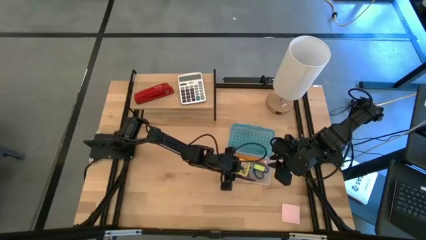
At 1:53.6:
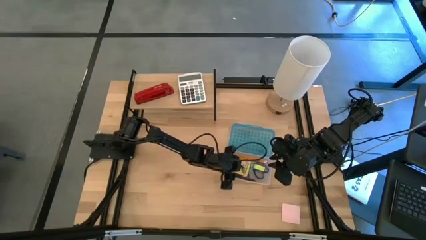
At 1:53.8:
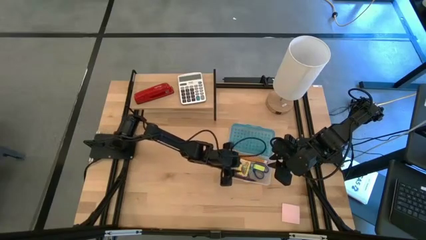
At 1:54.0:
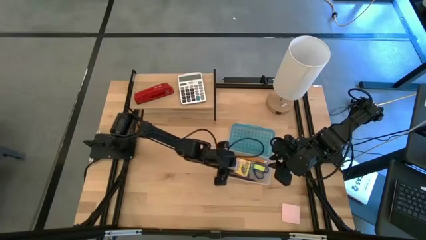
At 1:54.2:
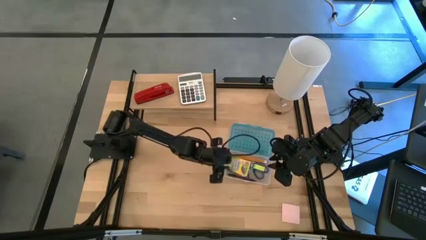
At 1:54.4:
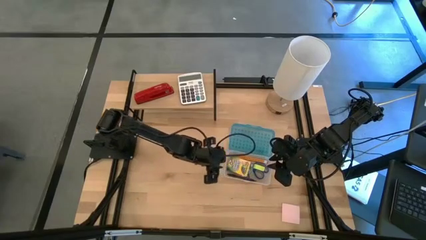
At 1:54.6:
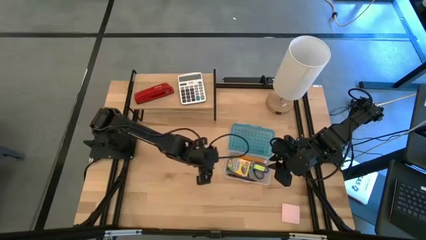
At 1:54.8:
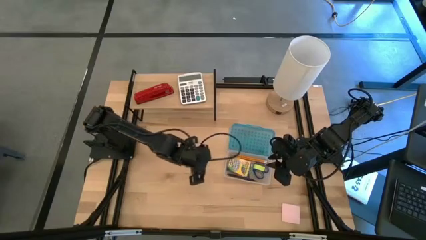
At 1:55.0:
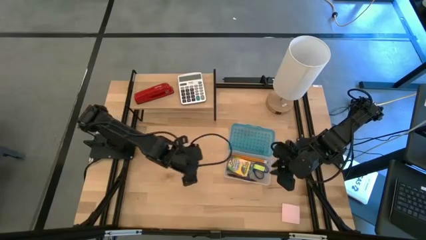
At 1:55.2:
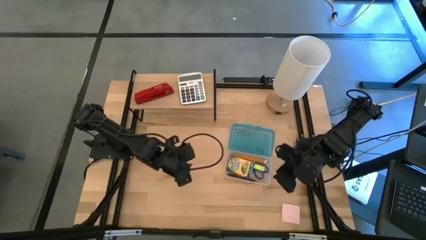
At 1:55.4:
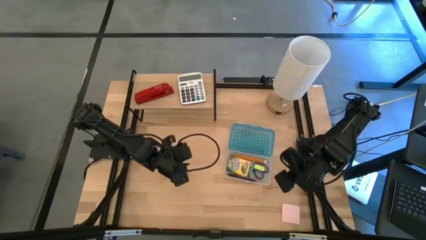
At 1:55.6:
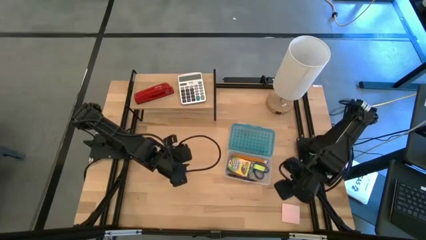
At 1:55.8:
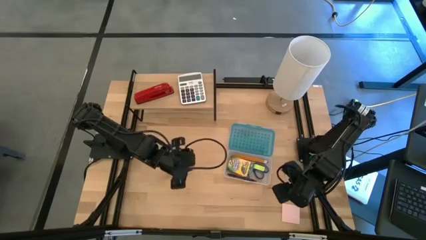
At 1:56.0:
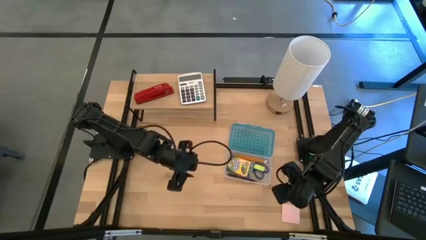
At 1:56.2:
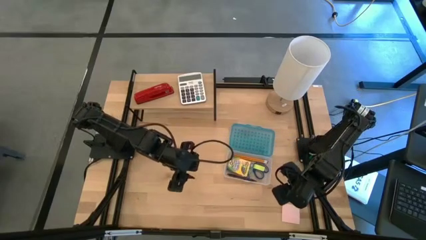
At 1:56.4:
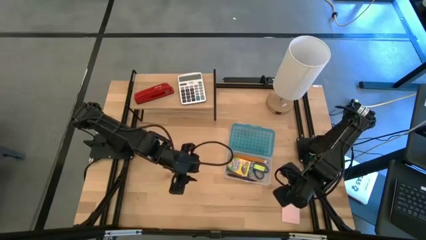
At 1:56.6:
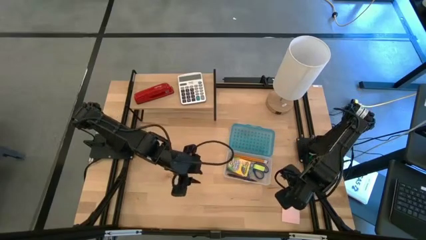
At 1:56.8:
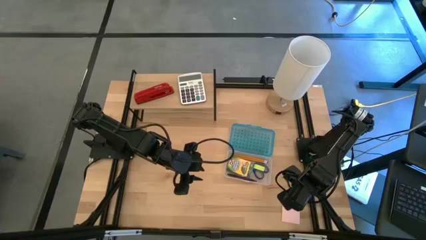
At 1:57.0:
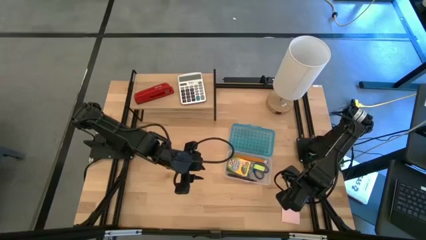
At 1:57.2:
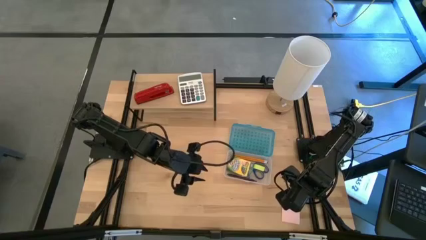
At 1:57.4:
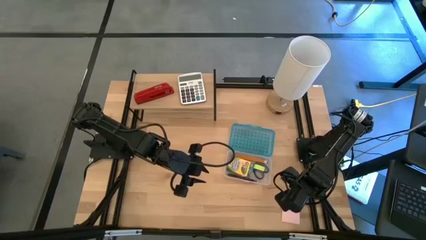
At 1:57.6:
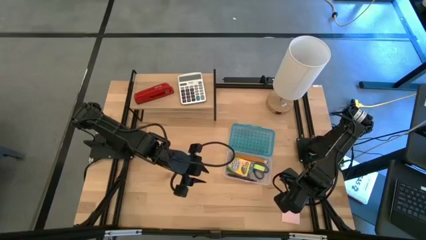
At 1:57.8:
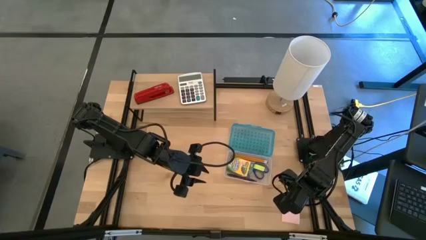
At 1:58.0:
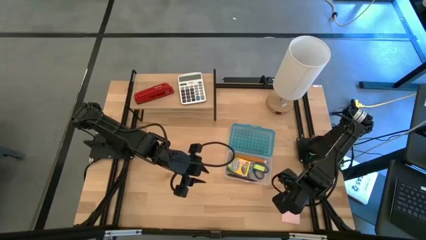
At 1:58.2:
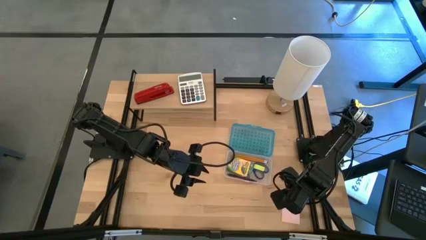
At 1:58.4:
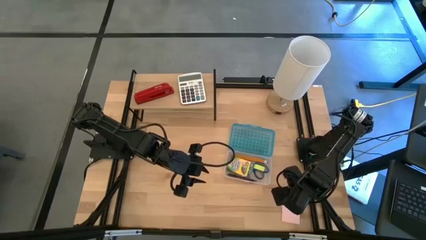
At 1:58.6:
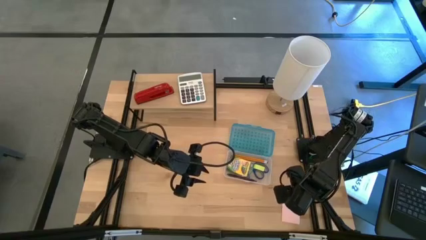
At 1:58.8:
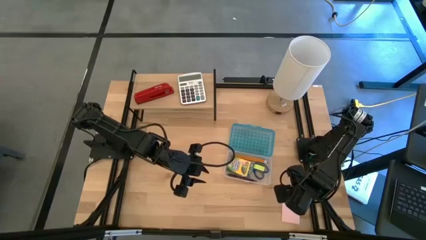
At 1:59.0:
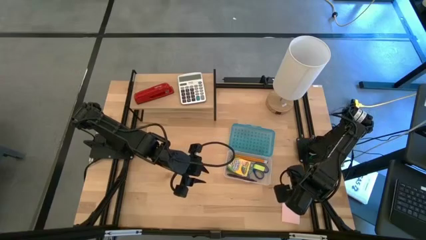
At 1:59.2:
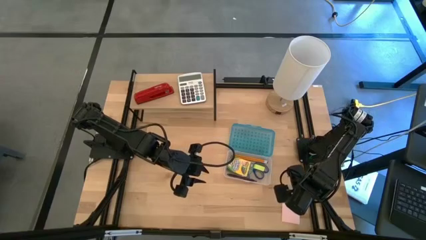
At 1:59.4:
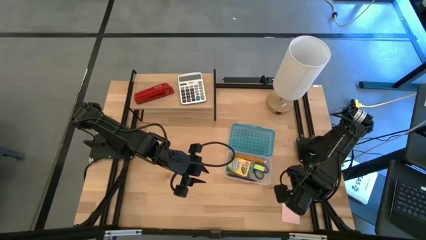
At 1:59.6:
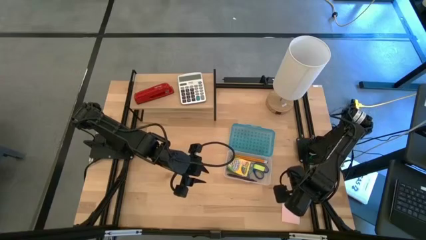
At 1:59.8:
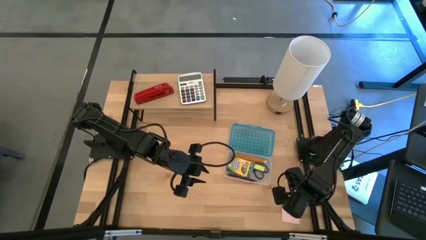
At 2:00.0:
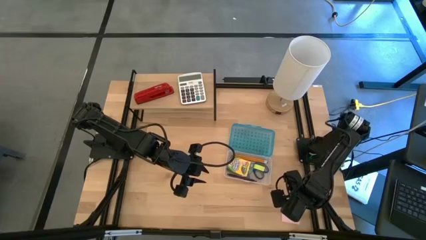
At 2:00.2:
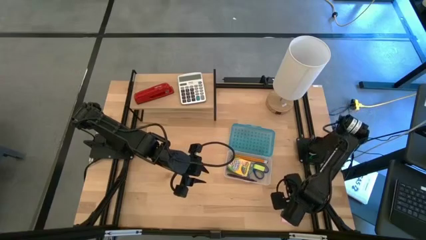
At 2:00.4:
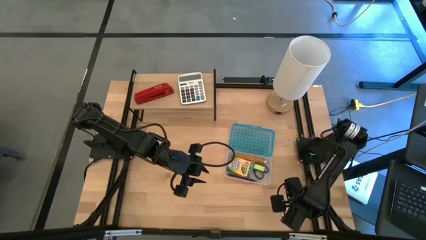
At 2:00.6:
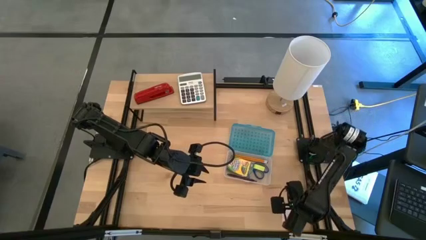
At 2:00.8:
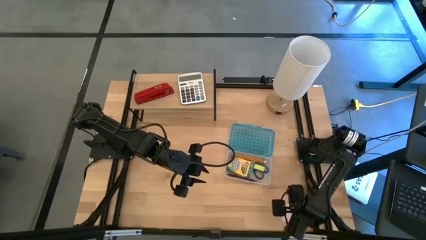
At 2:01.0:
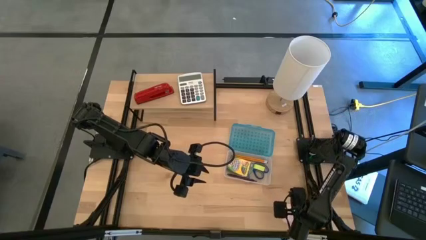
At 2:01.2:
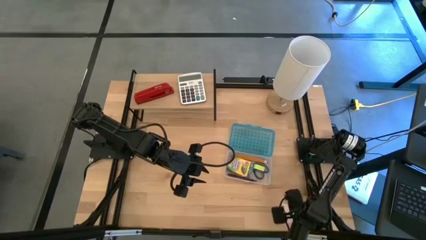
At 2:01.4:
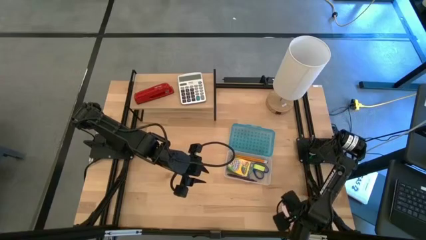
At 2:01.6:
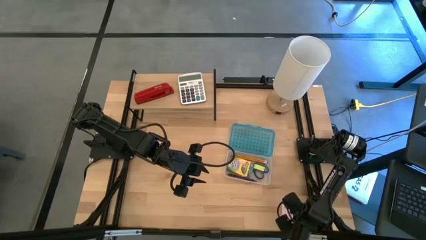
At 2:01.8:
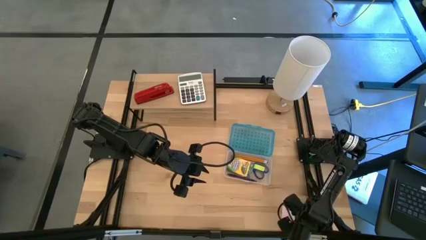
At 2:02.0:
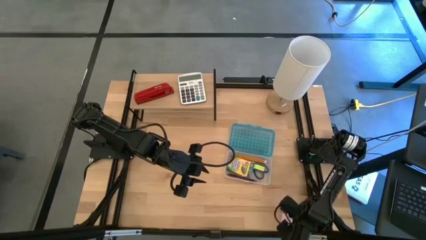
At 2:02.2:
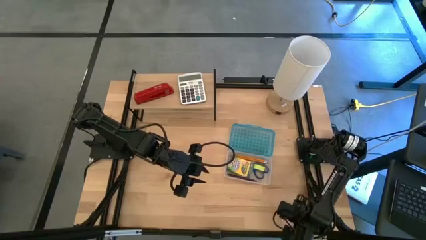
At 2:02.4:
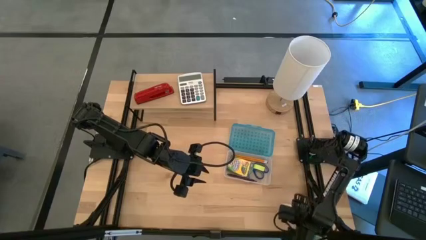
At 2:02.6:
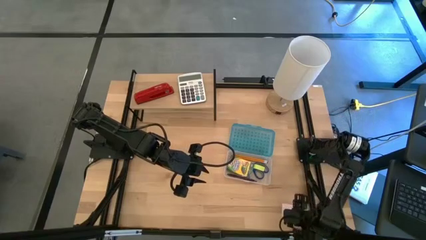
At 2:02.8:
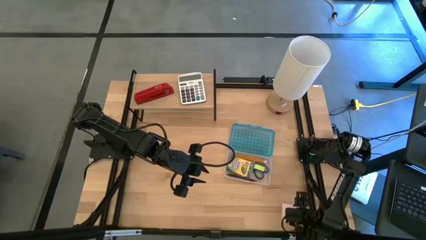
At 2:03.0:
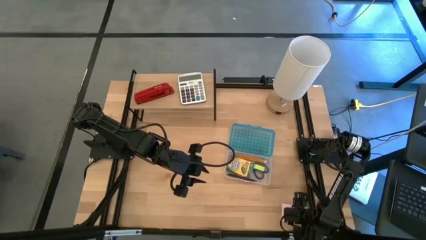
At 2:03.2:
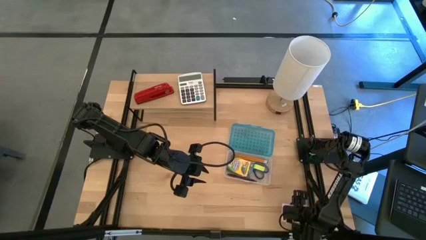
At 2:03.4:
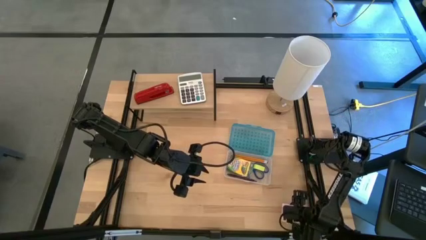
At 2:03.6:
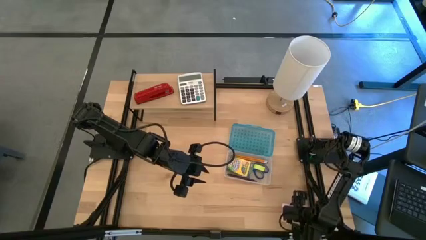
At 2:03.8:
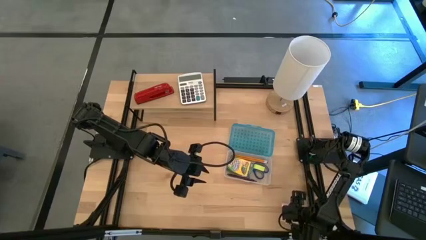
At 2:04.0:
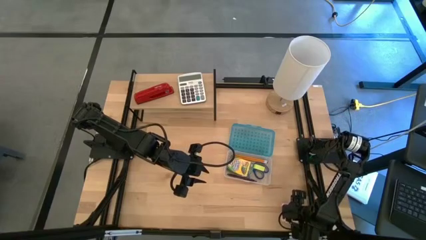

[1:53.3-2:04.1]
Task: Pack school essentials
Put the pink sticky note into the blue supply box

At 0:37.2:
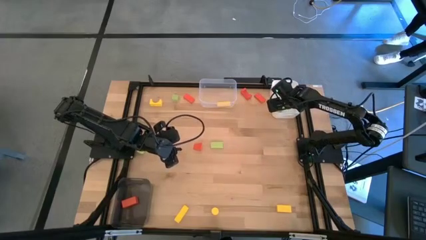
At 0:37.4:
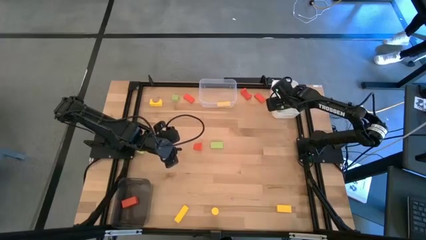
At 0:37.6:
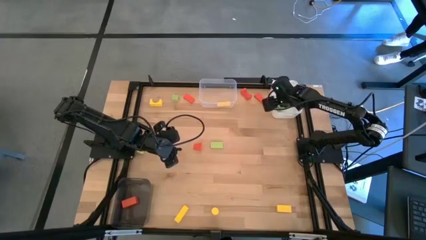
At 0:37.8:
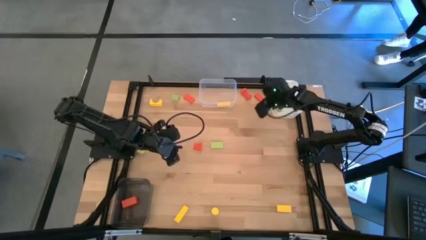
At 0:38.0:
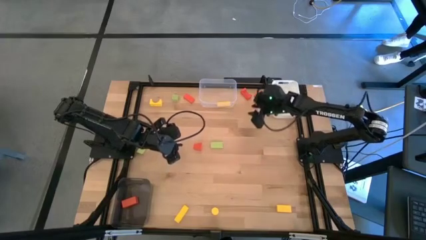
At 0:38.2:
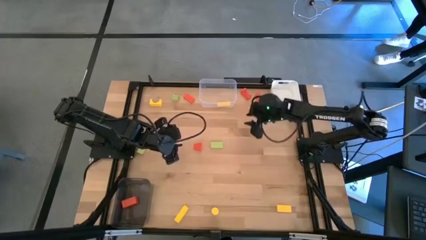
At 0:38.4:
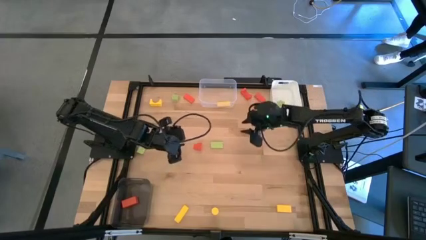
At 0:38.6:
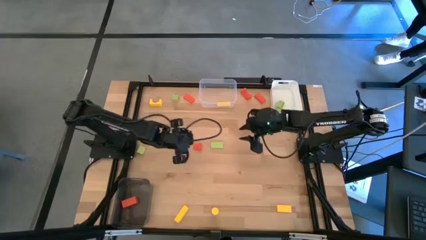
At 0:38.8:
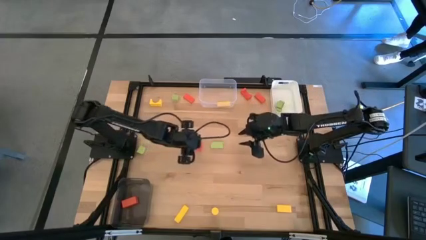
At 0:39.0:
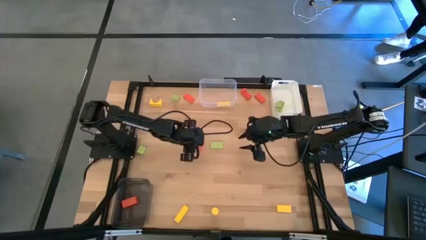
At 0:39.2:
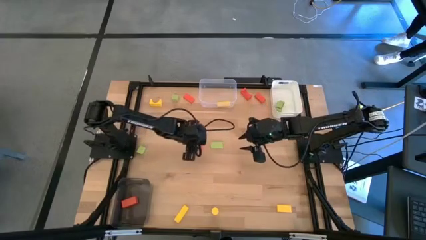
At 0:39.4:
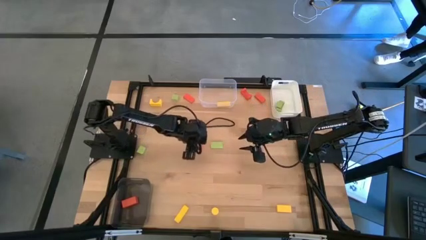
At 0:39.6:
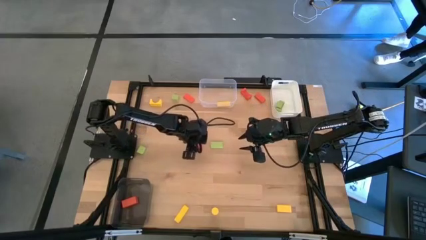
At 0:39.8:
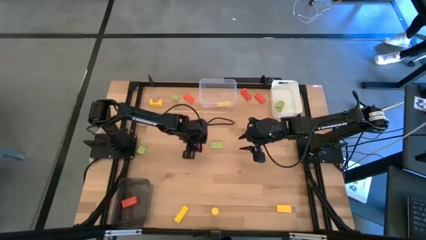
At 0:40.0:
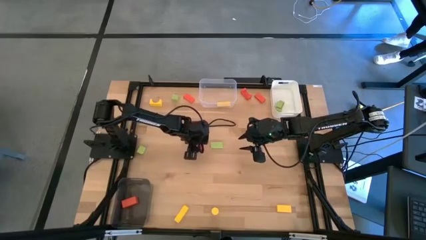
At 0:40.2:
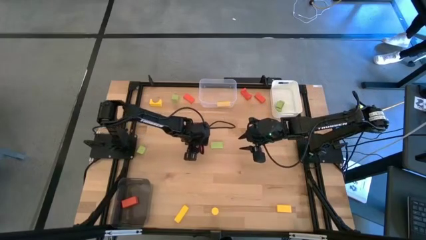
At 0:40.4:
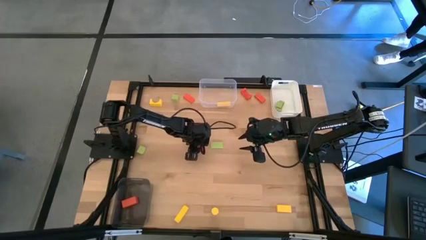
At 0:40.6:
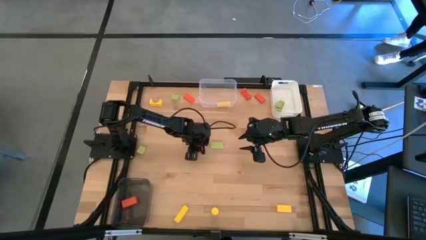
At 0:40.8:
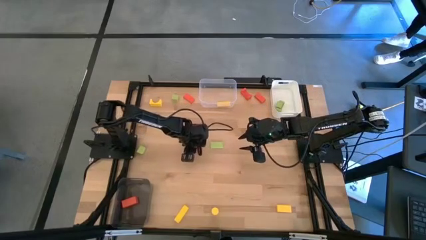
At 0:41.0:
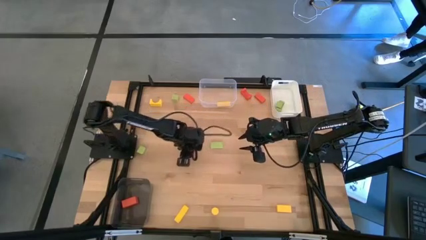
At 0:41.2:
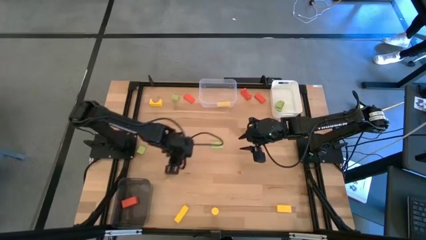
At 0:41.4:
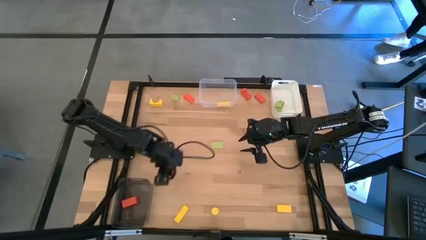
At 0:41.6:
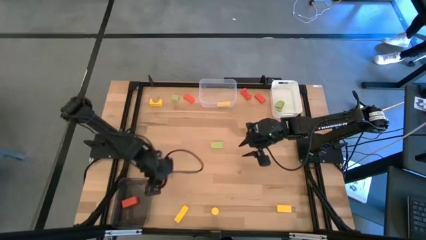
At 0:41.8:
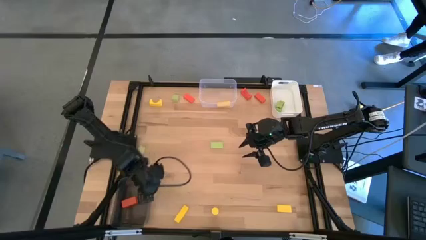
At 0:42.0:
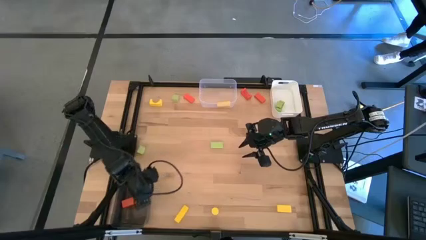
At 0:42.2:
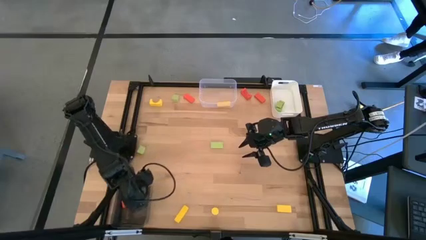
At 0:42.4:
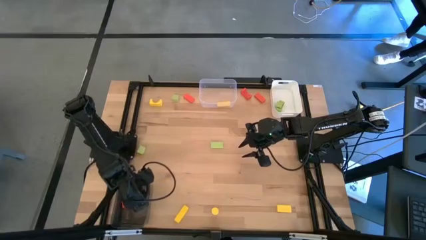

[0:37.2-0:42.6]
Task: Sort & place blocks by color
Put the orange triangular block into the black bin
